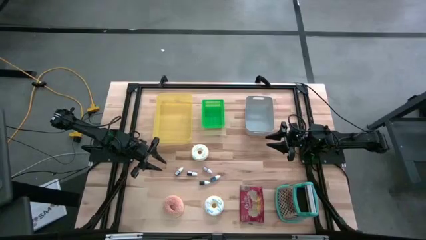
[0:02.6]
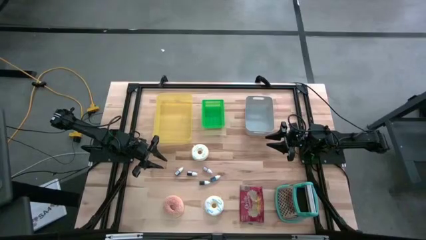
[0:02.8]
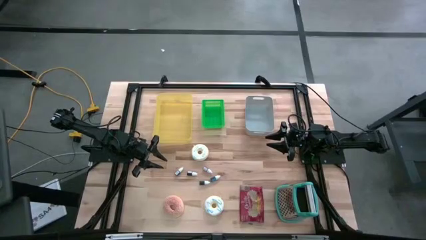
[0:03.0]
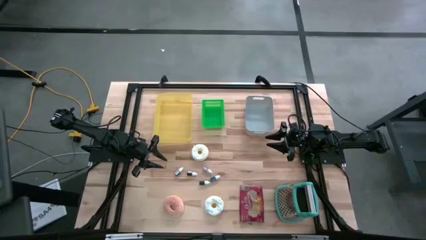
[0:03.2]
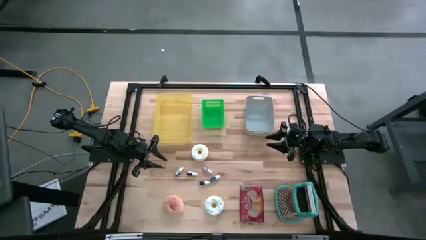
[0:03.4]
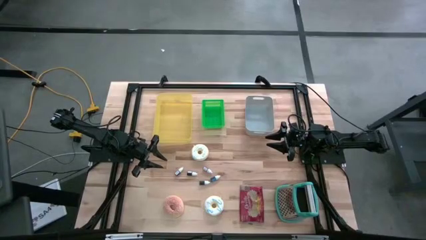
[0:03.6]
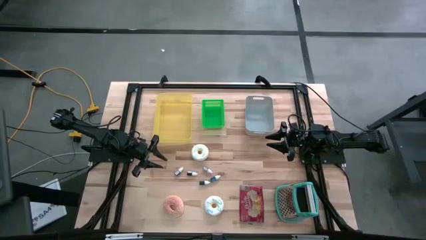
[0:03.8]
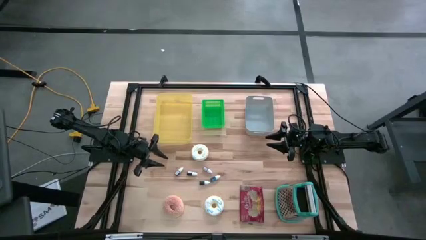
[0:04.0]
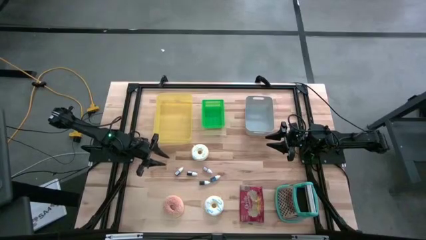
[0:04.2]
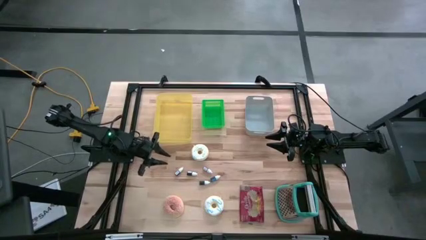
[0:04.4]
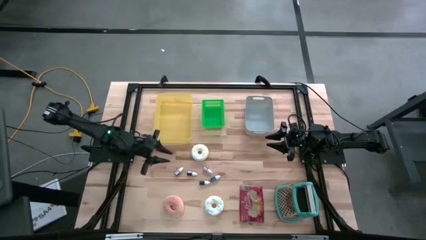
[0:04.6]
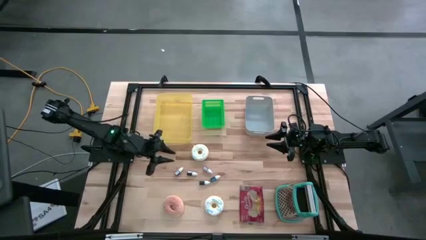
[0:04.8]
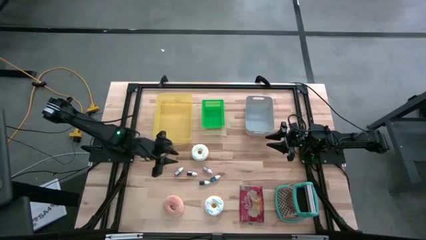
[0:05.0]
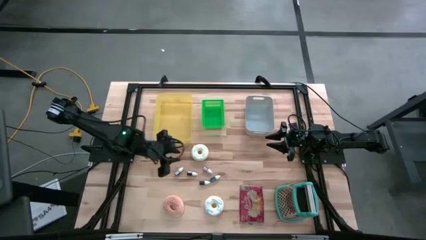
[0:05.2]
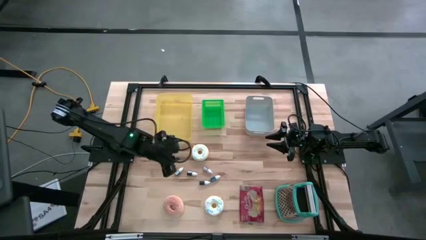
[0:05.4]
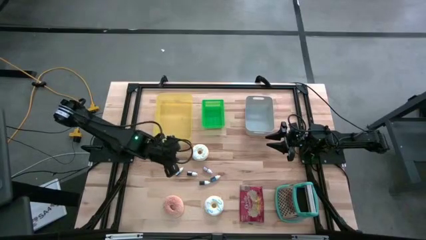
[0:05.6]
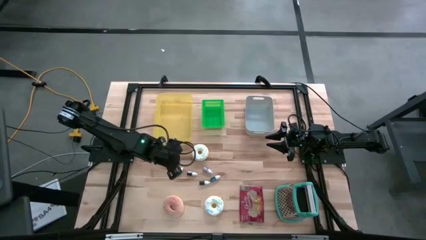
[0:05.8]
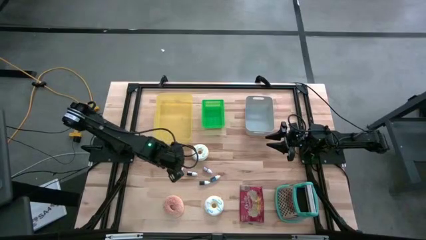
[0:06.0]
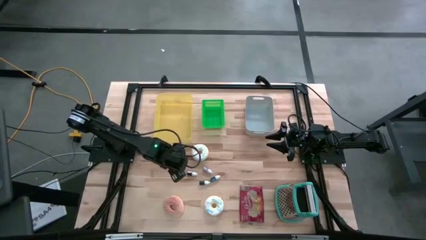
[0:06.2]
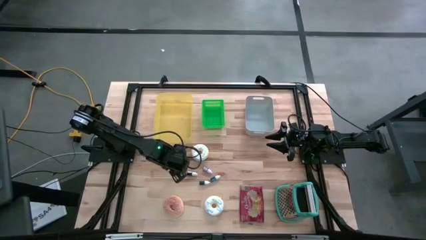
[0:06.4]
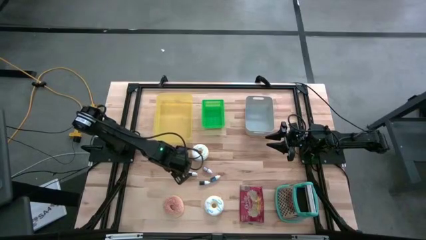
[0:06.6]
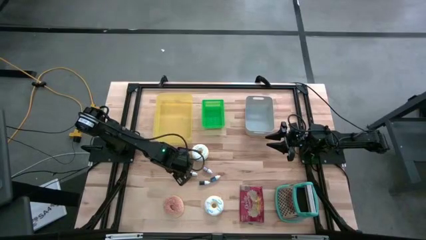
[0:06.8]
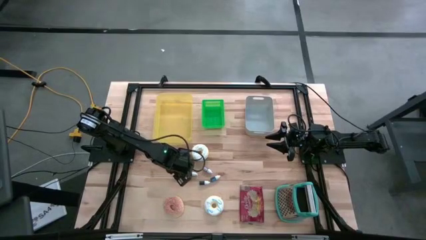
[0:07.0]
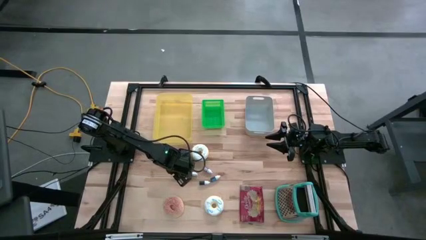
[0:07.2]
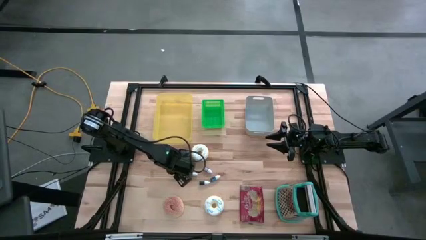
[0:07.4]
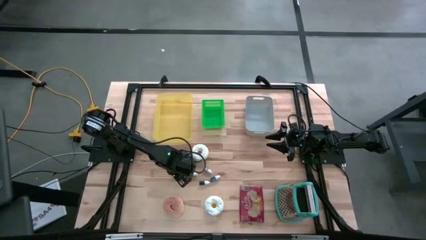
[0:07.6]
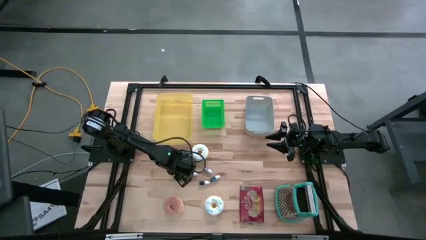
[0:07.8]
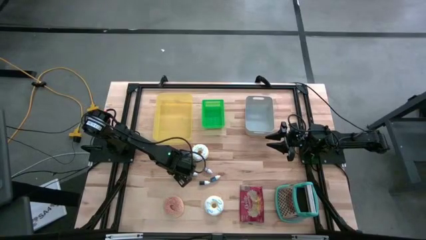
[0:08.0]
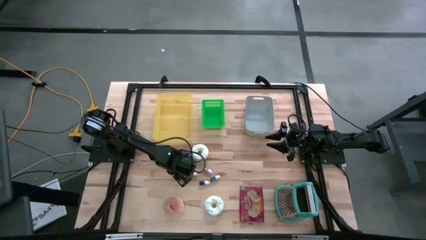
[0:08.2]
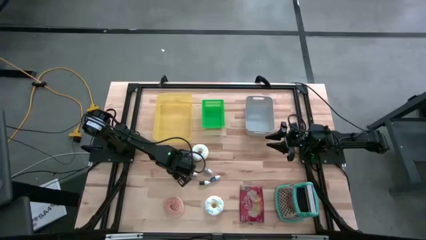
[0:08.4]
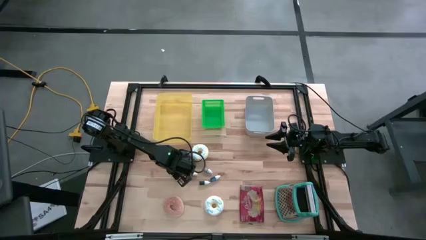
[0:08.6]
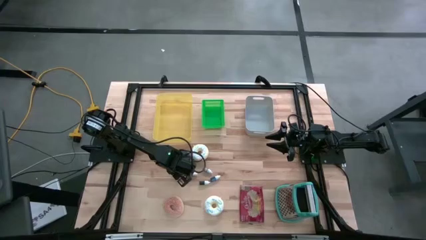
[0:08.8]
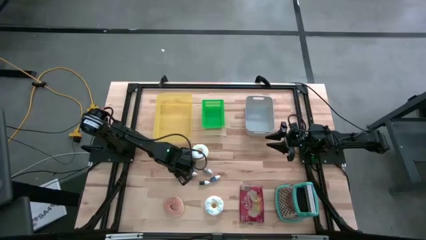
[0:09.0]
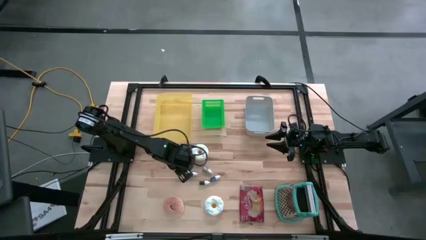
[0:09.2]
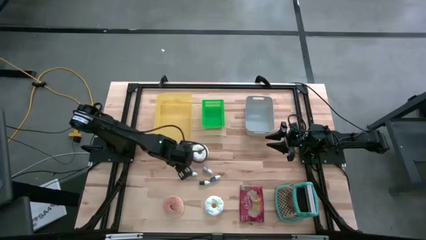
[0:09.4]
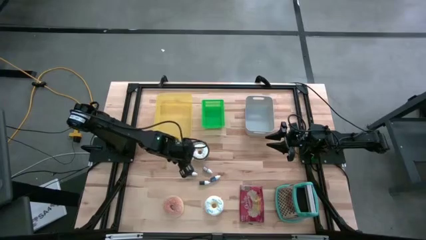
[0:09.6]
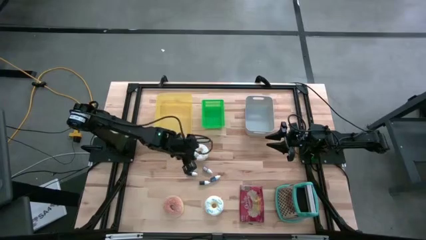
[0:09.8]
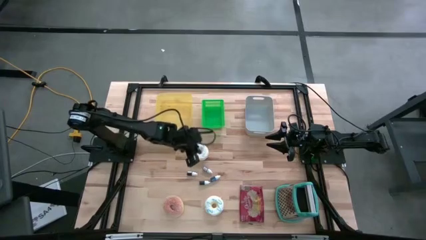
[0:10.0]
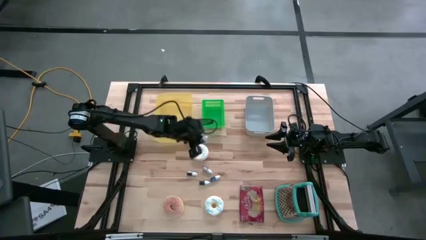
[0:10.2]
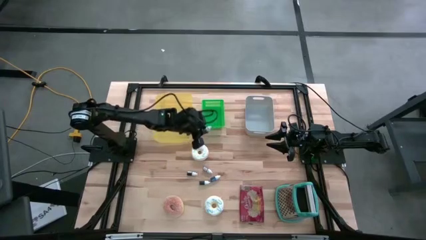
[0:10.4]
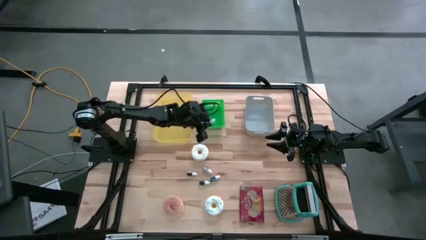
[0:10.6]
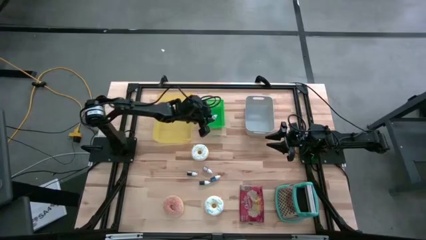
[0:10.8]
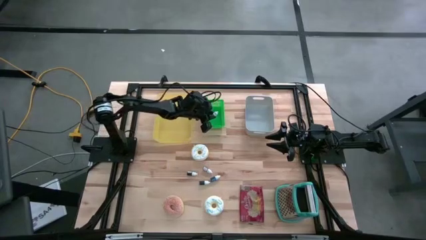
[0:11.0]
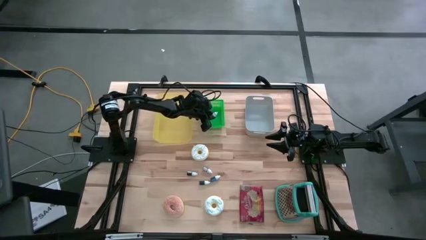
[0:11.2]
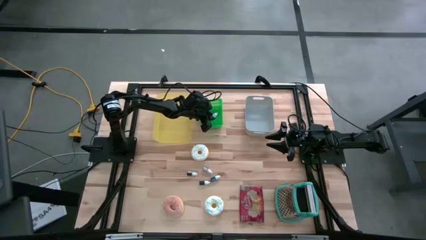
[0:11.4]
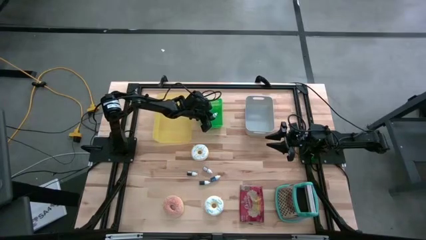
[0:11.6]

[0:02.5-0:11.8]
Put the violet food coloring bottle into the green bin

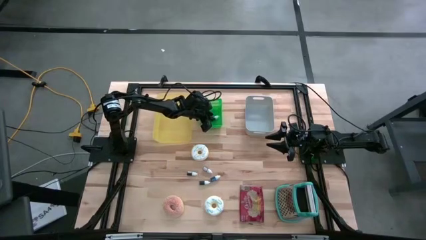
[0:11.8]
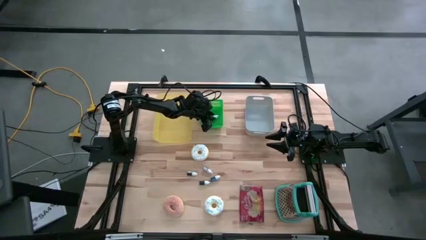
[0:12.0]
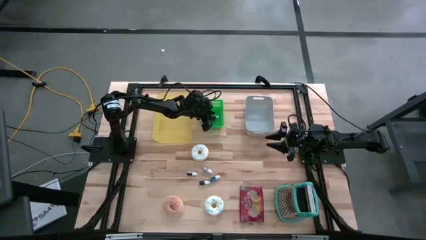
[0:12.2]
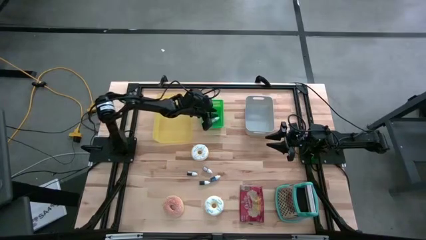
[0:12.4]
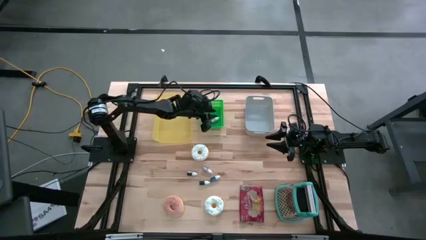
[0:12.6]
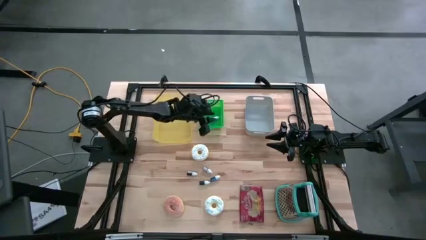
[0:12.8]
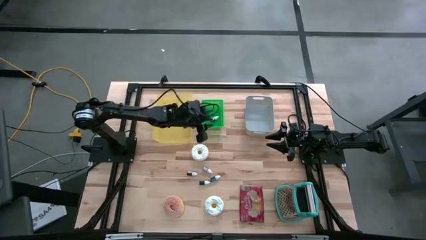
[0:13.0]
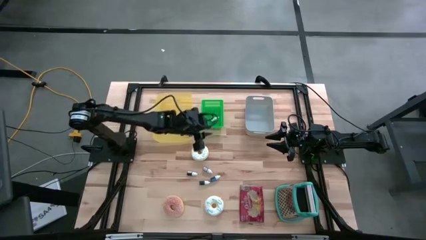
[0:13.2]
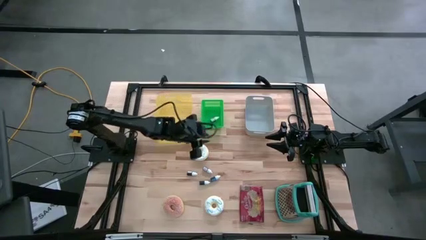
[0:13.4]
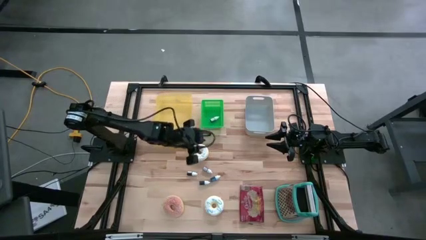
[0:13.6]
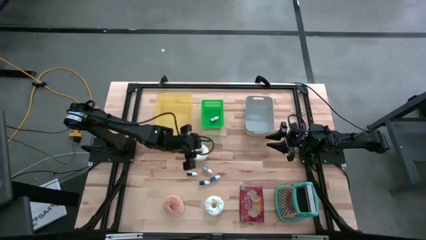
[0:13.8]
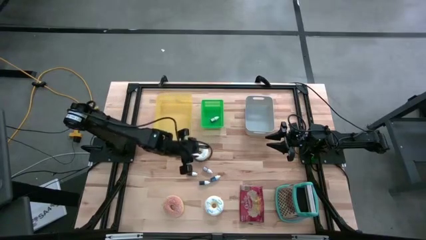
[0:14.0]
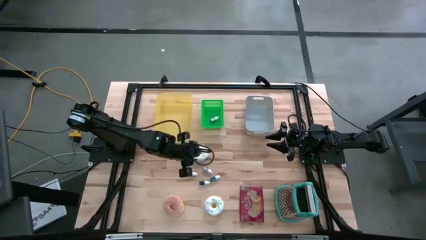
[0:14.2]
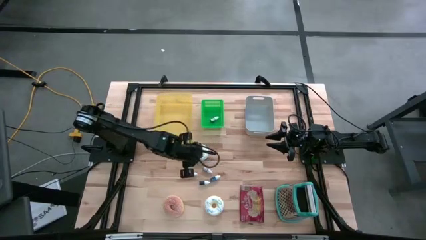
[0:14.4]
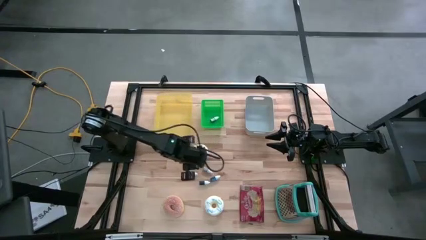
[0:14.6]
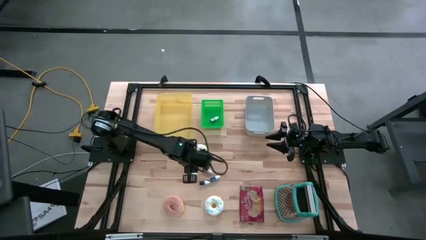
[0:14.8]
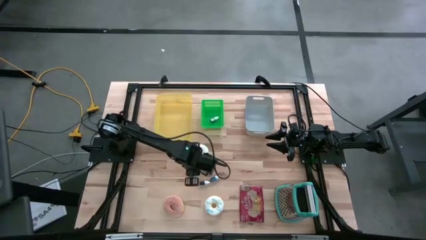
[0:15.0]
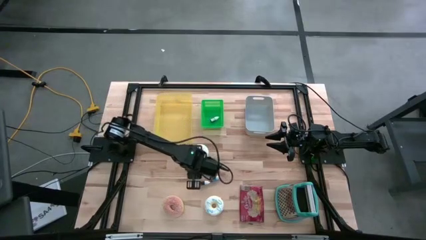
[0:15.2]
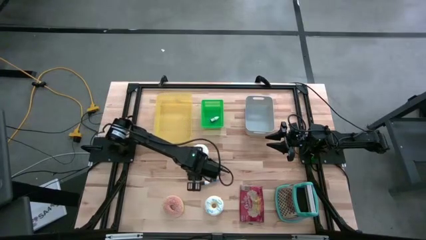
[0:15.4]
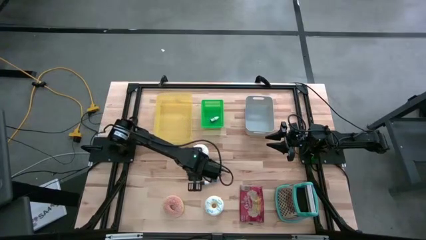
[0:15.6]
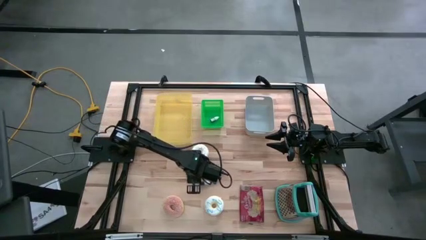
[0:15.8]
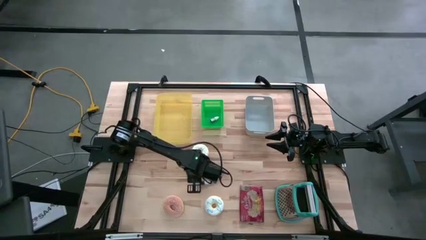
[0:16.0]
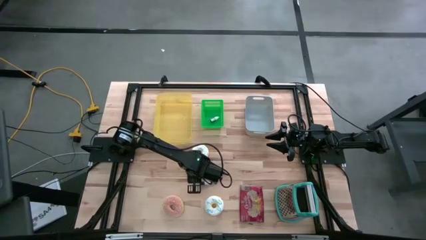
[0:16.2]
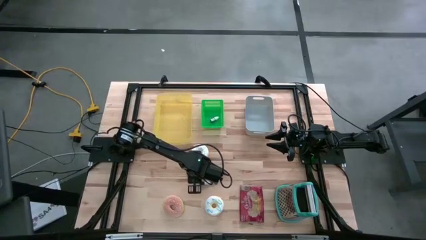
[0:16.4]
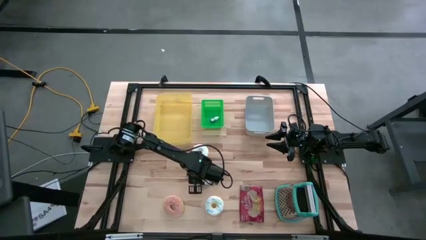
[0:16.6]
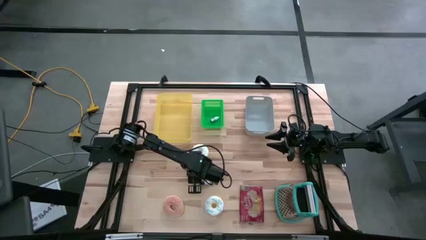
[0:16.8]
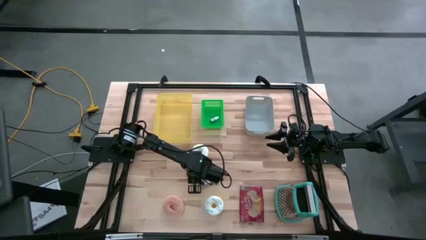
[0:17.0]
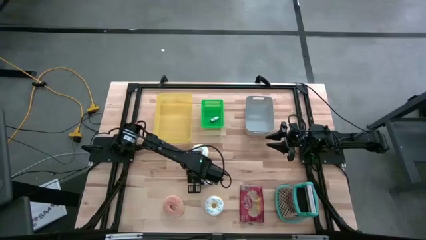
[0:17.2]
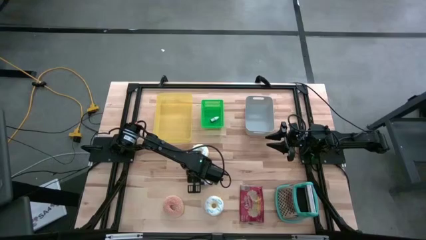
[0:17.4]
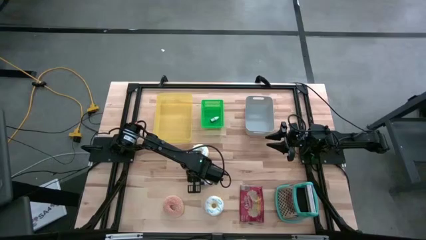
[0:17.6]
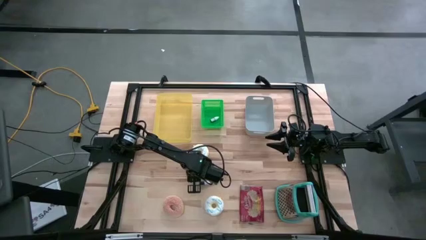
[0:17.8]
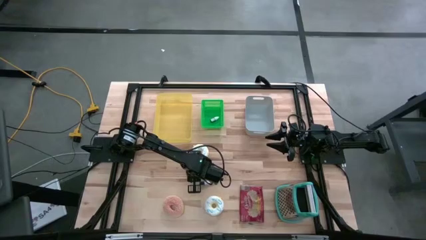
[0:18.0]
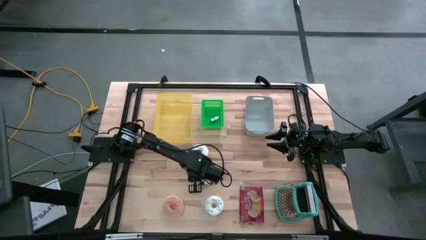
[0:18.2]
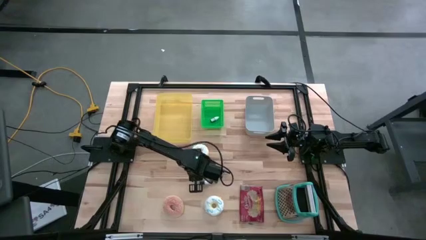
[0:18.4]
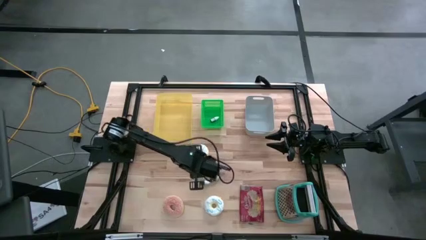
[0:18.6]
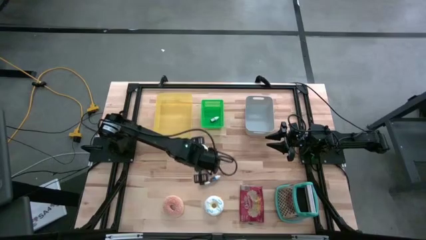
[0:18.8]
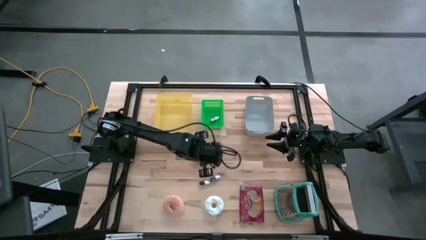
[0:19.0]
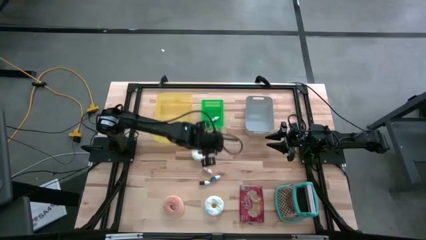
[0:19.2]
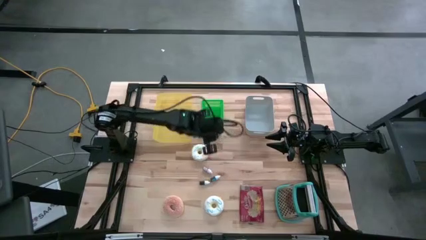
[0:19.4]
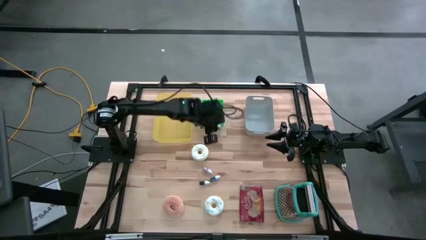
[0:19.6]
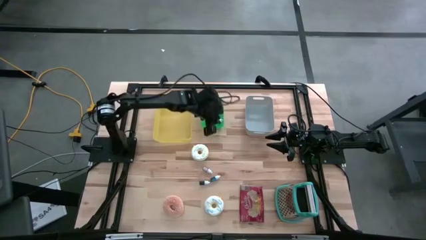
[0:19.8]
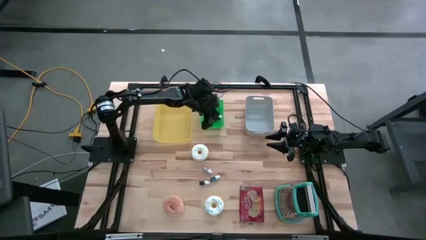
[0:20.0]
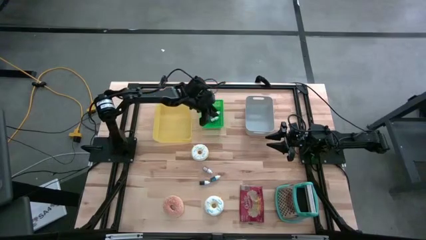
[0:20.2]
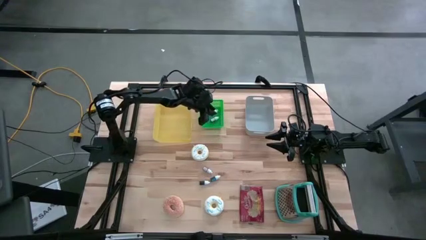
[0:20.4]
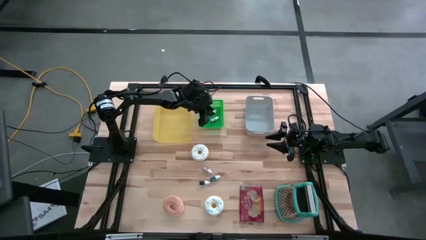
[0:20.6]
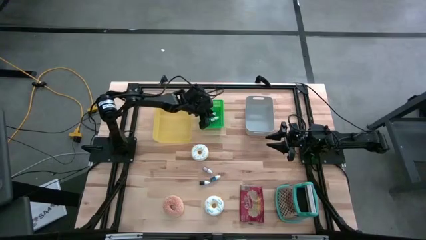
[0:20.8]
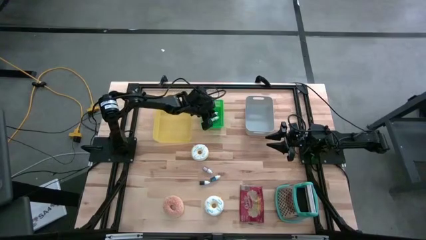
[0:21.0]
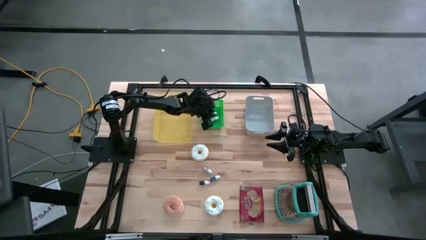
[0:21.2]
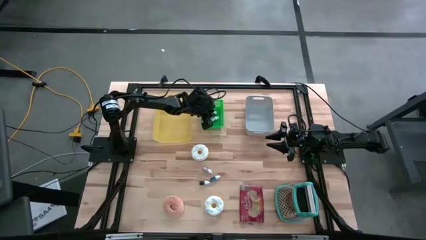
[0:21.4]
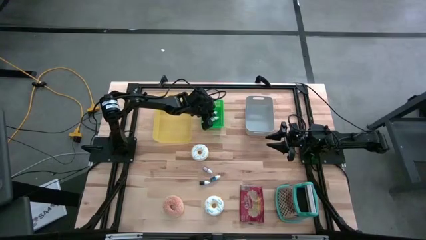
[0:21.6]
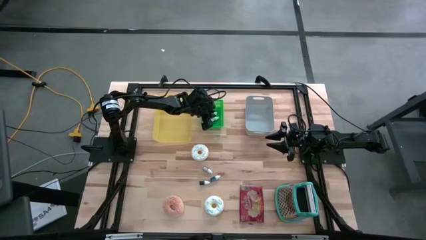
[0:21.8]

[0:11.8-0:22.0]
Put the left green food coloring bottle into the green bin
